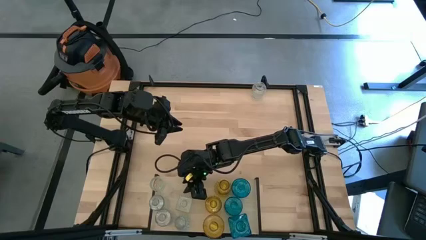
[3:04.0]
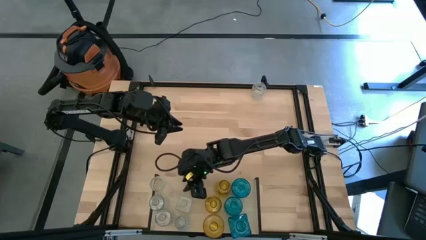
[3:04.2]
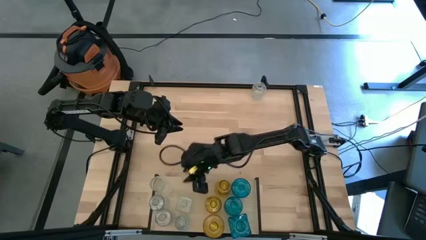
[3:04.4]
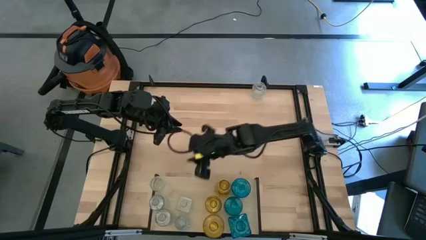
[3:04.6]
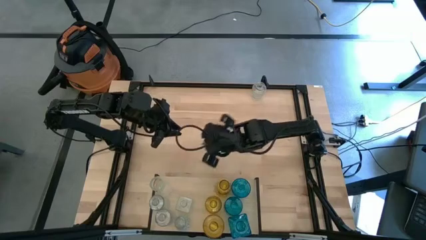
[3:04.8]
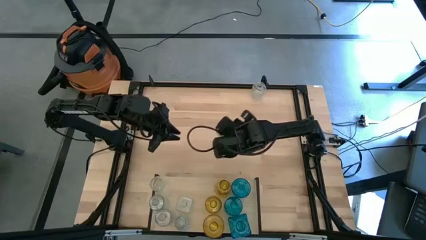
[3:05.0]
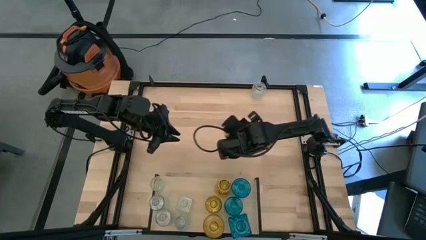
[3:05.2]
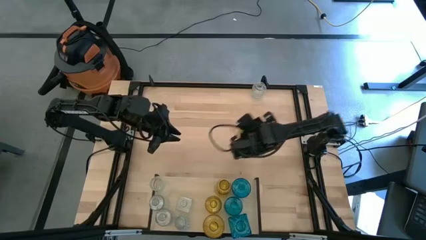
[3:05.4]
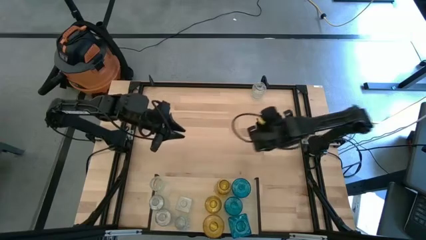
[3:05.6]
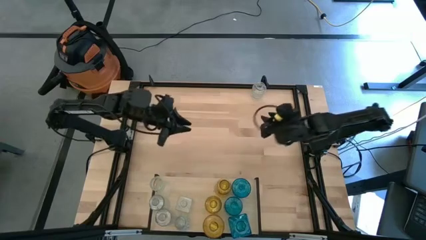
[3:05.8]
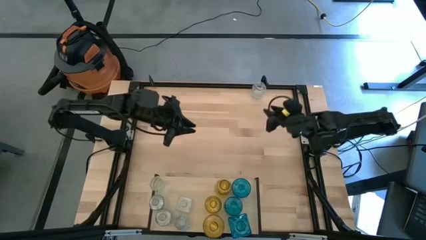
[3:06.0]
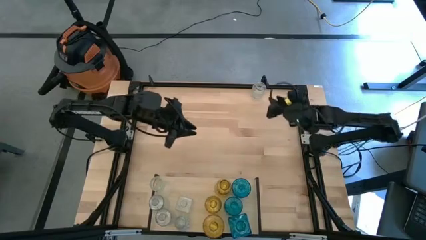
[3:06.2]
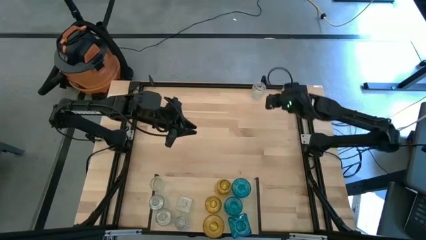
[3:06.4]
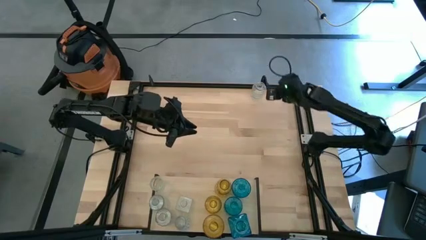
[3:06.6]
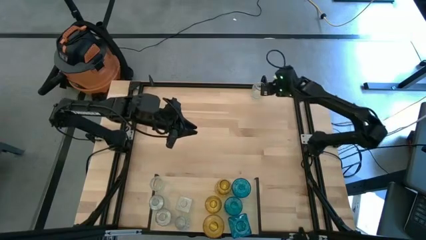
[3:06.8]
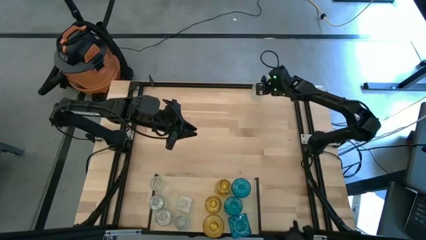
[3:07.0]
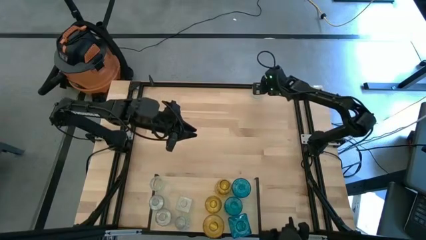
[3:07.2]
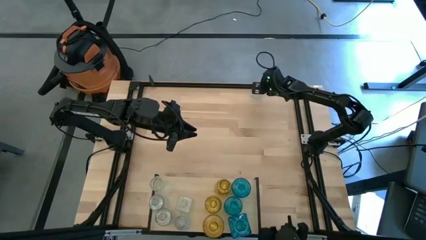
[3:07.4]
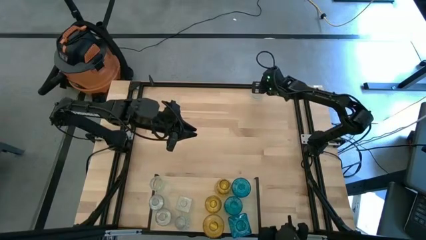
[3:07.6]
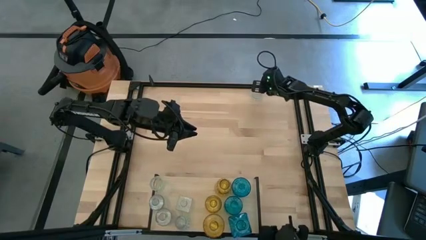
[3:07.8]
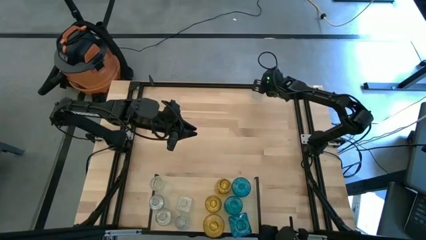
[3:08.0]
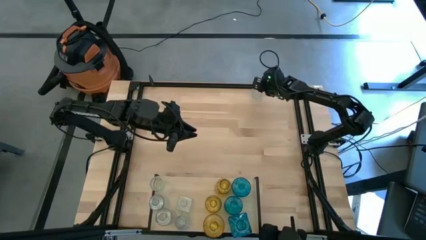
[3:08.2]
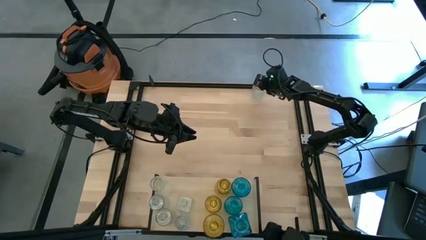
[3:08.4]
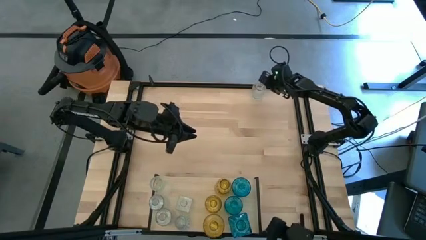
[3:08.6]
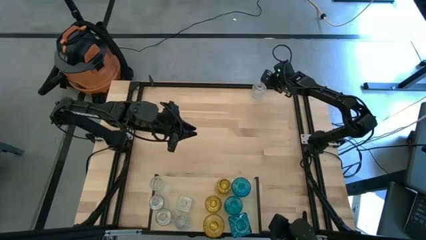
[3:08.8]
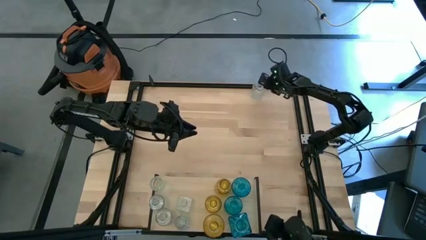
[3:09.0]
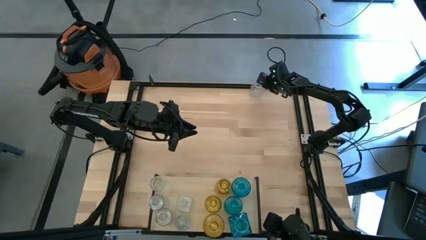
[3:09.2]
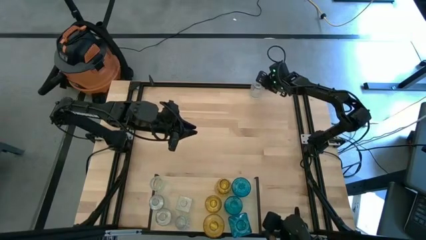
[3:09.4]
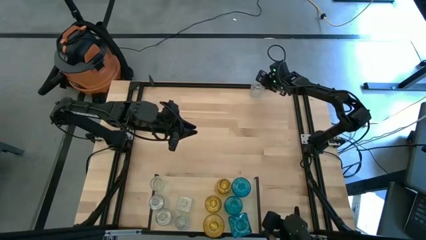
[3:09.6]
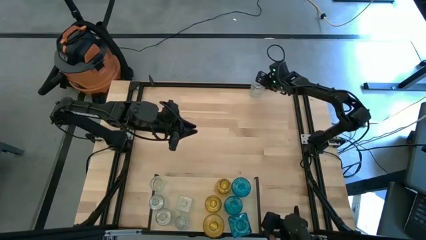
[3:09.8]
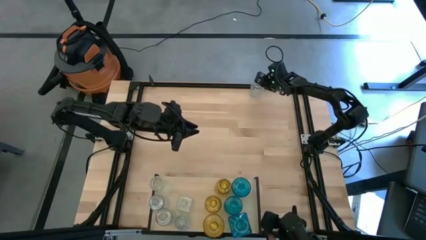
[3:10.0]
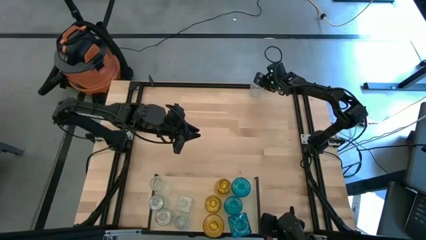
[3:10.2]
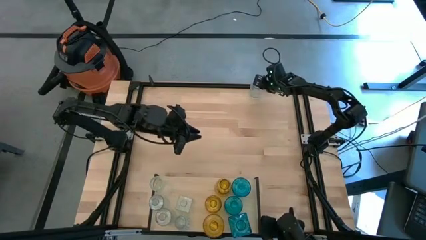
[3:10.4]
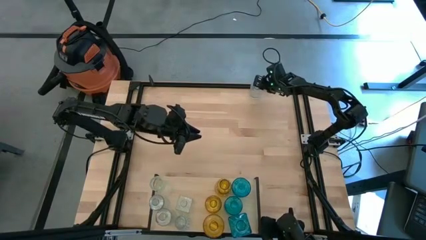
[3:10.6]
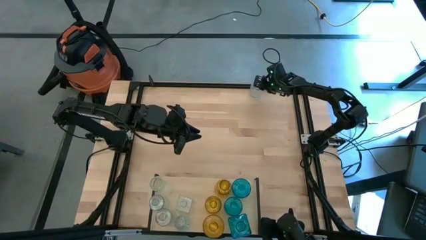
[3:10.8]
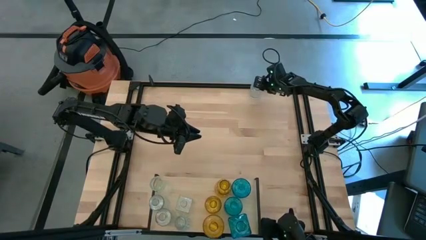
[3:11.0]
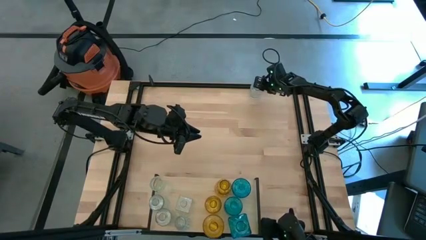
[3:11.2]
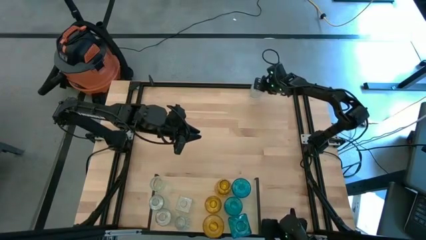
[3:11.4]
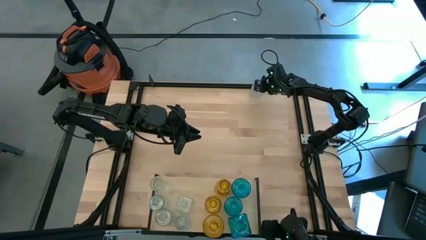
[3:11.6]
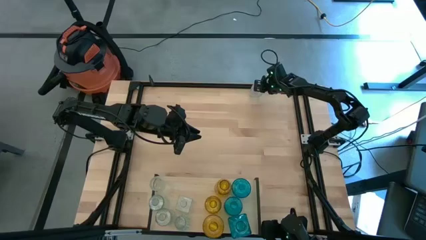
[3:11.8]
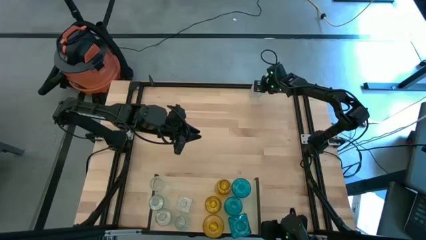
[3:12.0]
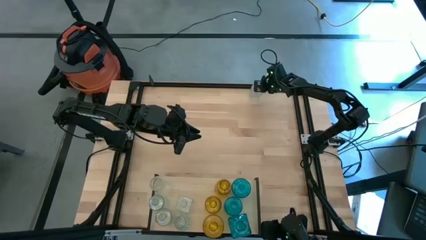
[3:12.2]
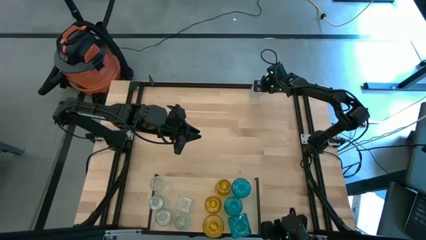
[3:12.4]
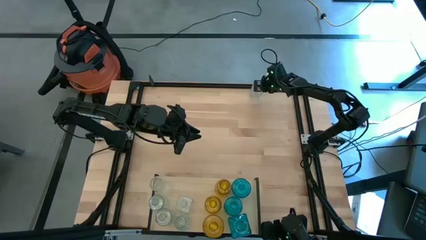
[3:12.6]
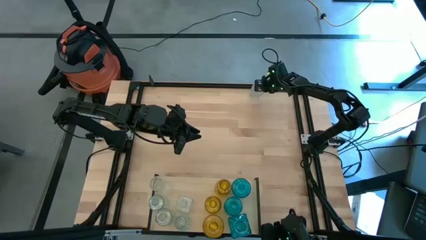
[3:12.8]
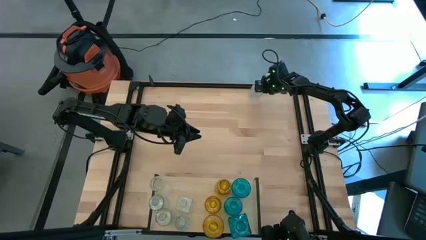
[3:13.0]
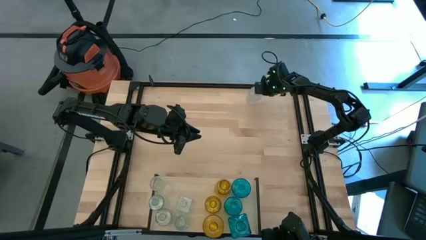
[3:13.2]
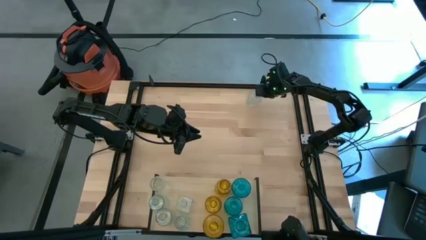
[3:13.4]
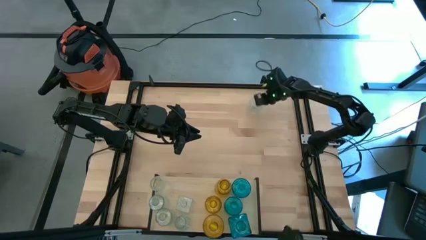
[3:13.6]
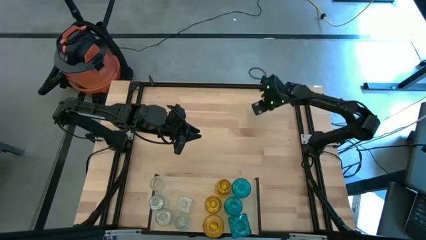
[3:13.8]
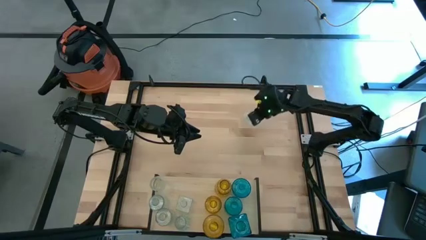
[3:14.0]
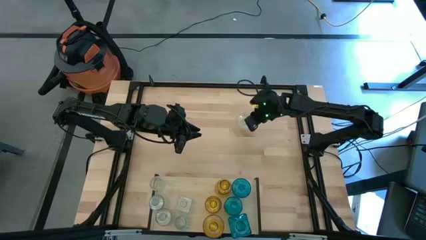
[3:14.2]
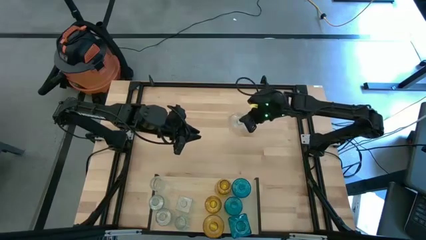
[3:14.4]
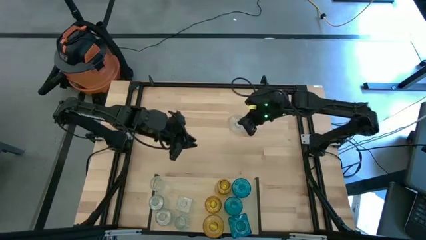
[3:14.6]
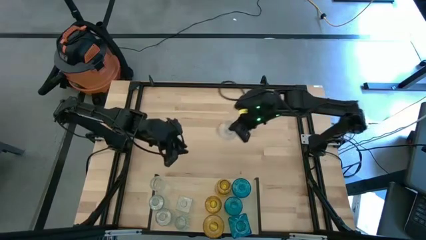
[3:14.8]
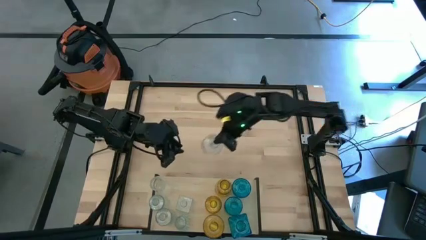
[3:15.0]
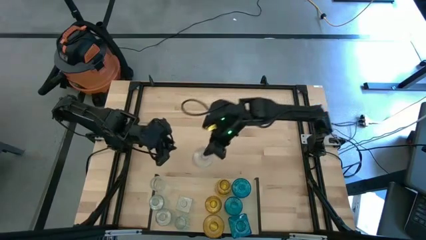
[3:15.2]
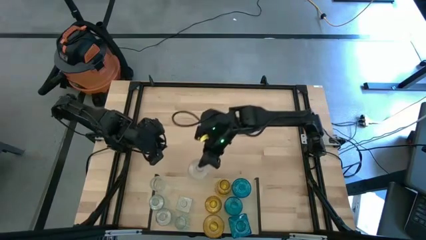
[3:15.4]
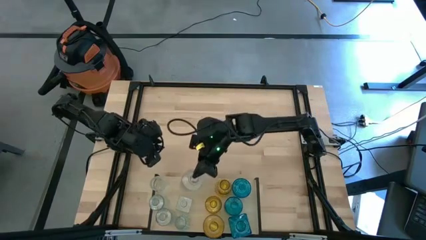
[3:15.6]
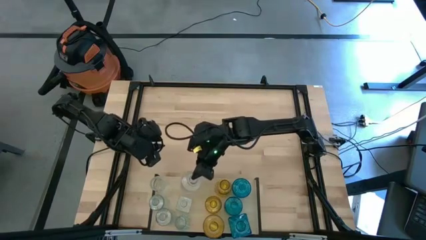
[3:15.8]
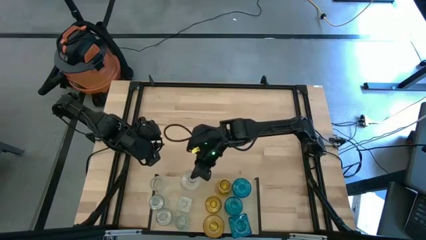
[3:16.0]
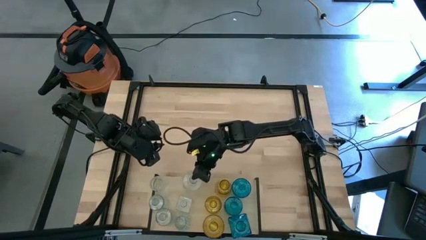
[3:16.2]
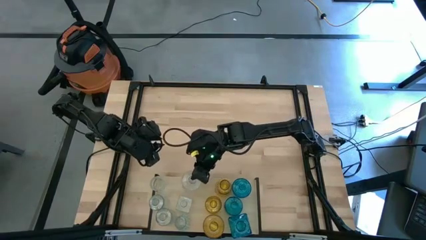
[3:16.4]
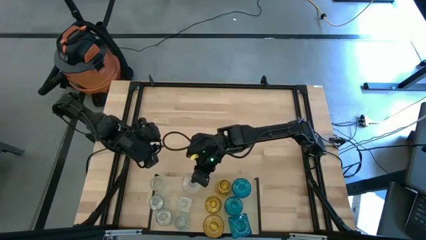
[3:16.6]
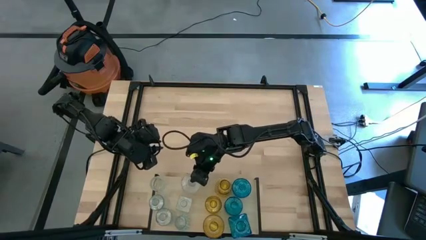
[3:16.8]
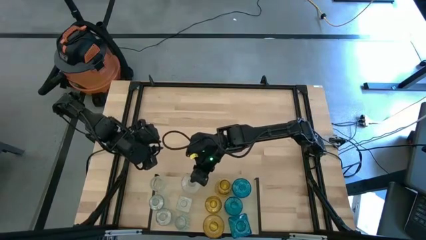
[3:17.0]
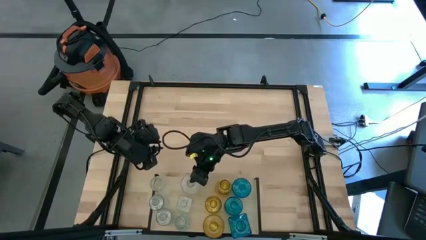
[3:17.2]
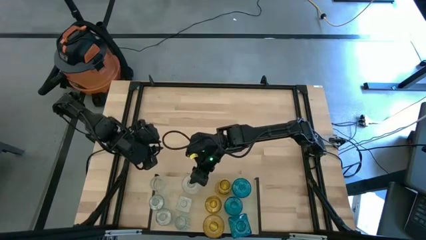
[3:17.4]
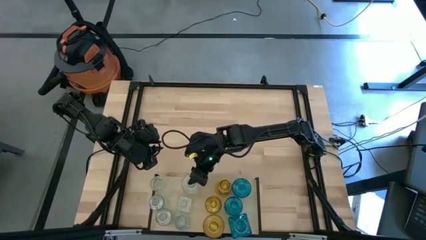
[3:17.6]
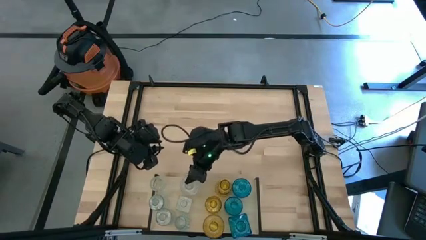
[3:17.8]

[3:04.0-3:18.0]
Task: sort vases onto shelf
Put the transparent vase on the shelf aligned with the other transparent vase

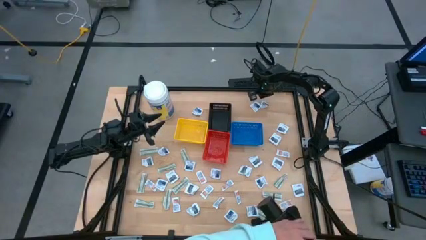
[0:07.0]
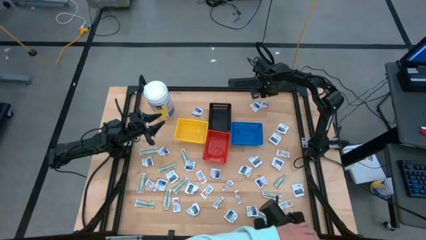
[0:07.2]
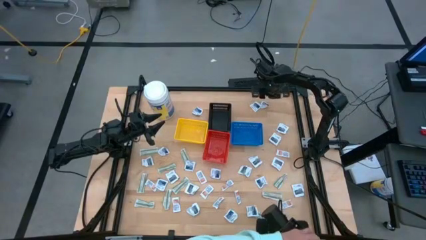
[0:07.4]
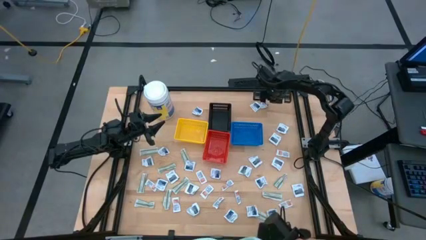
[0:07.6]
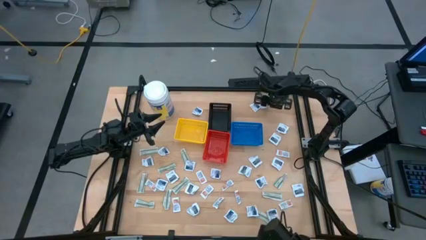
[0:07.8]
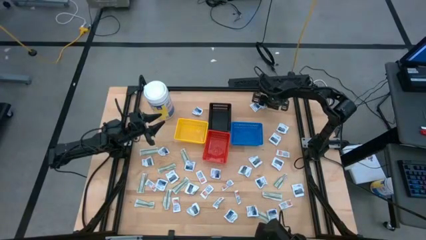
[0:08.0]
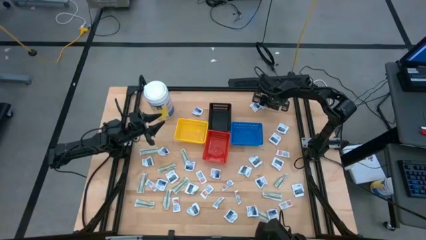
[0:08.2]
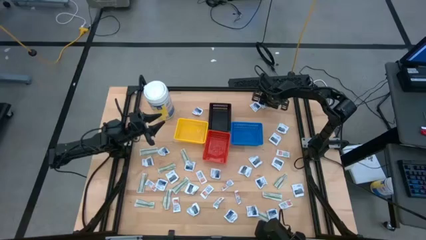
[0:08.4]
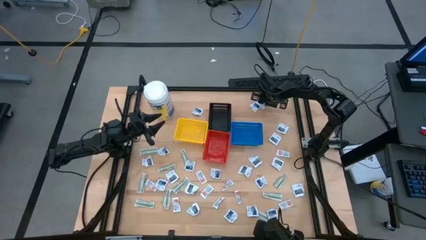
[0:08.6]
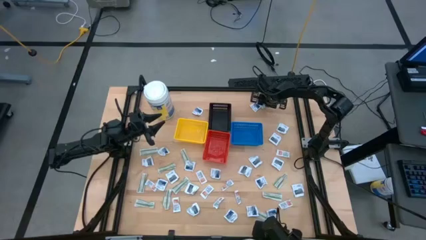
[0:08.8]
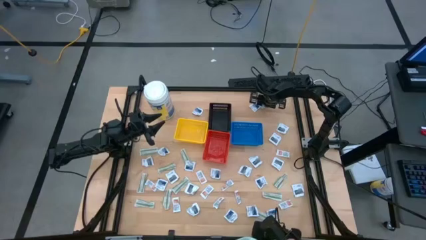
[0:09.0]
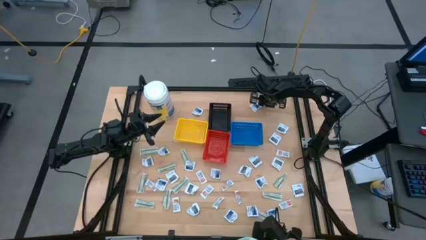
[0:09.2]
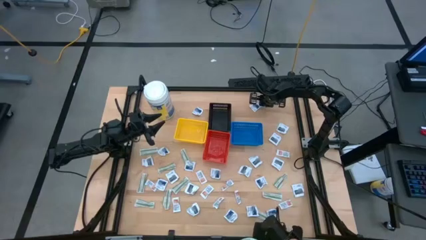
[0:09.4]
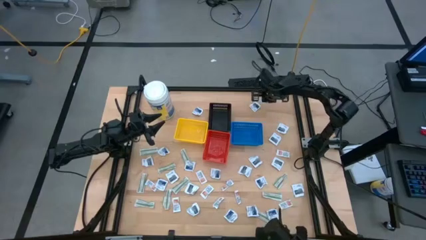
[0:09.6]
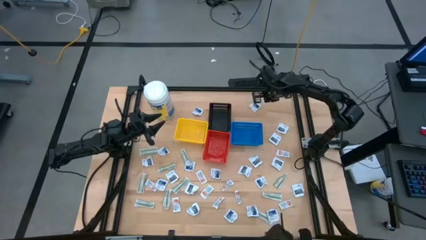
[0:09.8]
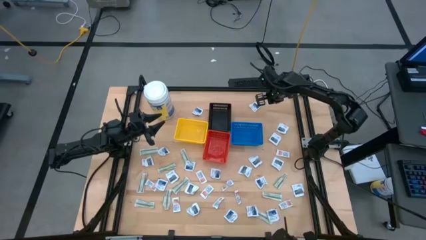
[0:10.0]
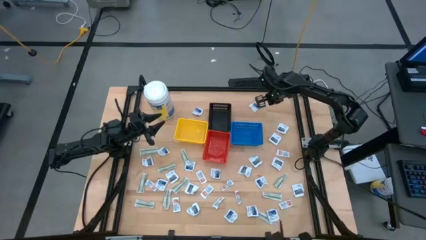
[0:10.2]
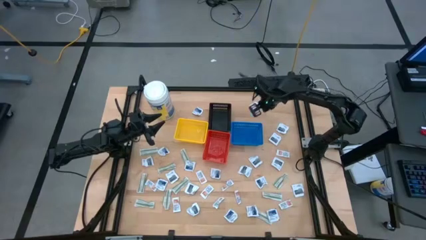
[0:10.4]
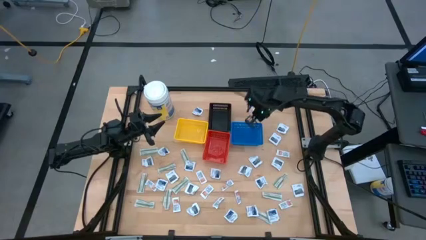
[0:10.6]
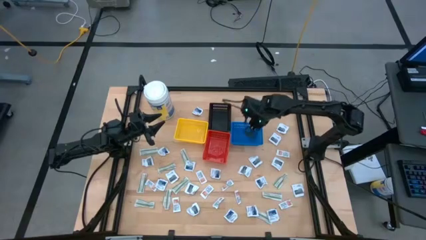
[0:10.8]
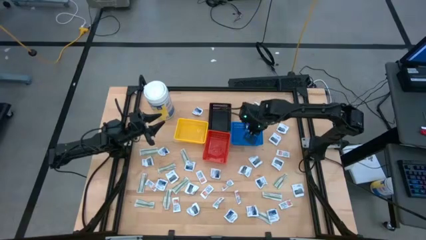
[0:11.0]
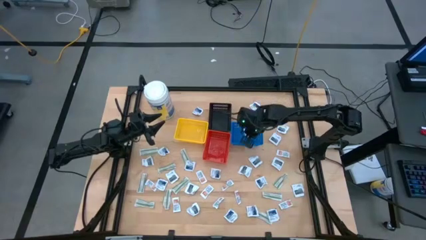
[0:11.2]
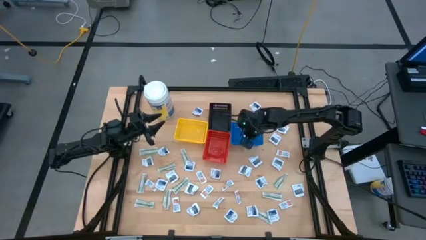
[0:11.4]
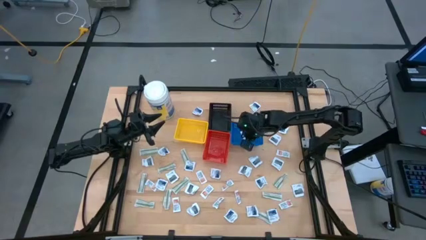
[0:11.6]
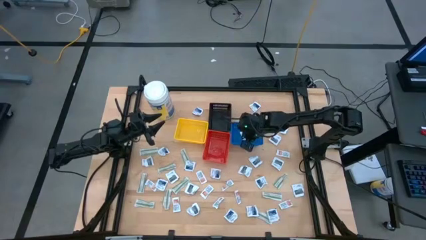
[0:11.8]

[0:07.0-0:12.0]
Task: Pick & Place First Aid Supplies
Put the alcohol pad into the blue bin
